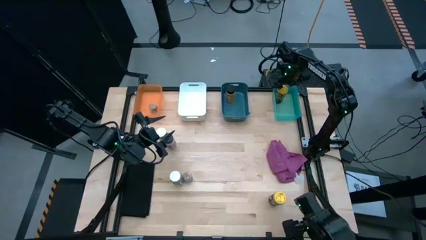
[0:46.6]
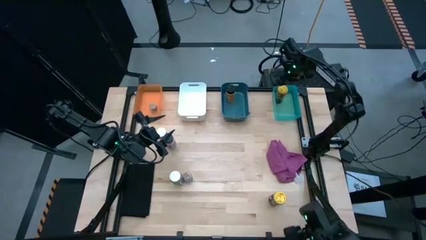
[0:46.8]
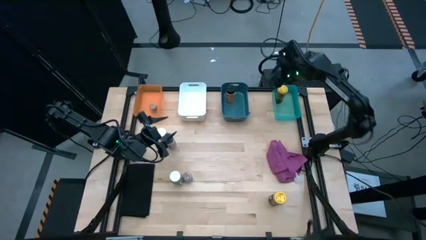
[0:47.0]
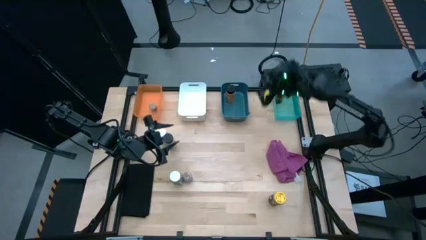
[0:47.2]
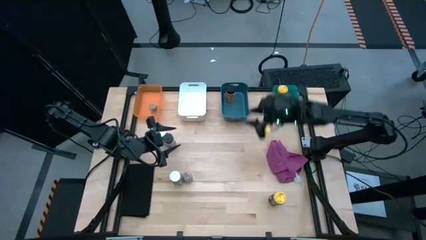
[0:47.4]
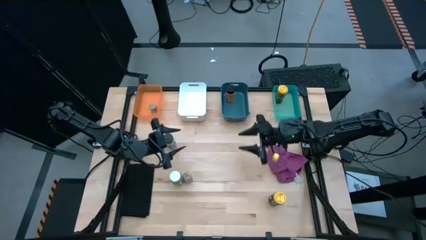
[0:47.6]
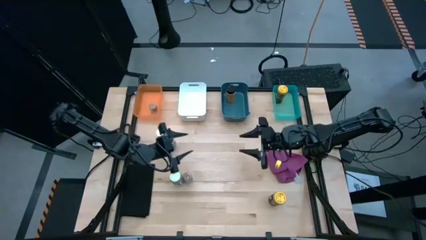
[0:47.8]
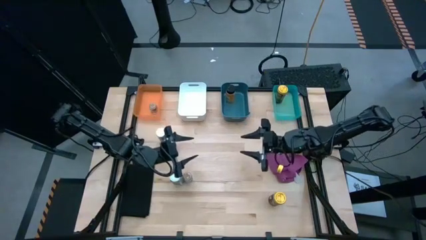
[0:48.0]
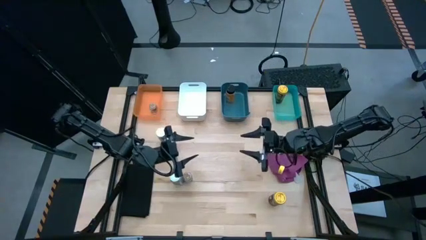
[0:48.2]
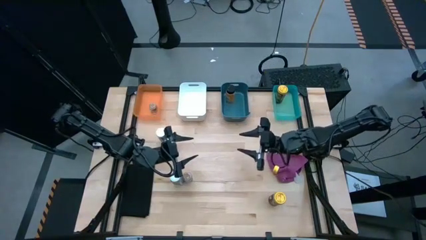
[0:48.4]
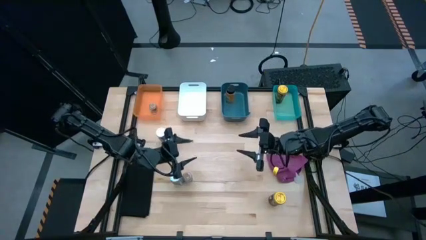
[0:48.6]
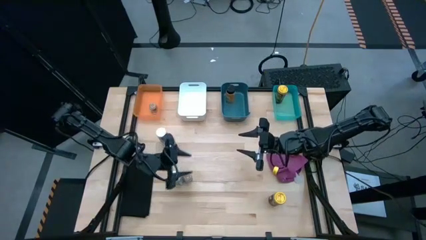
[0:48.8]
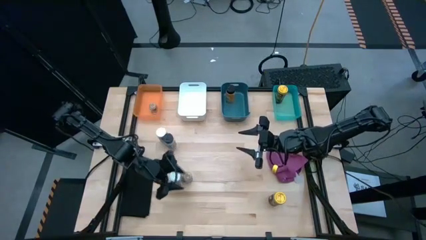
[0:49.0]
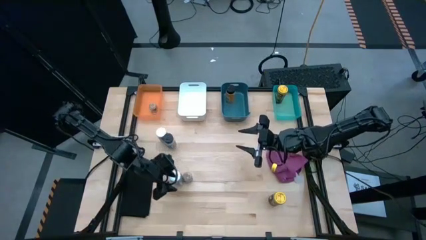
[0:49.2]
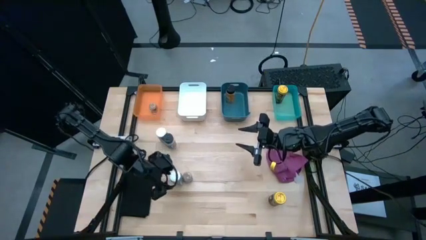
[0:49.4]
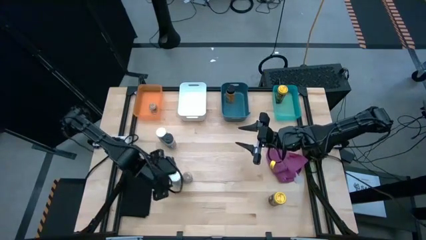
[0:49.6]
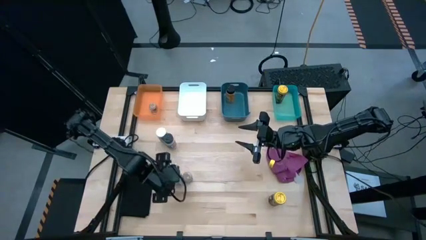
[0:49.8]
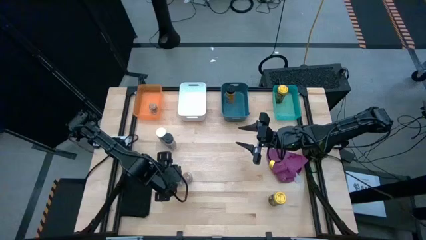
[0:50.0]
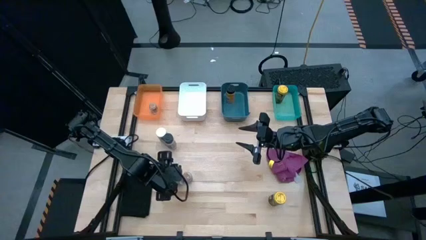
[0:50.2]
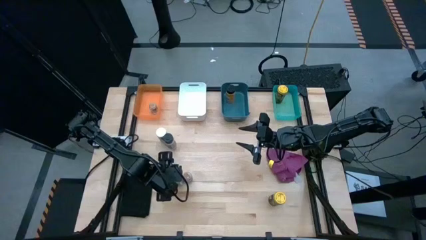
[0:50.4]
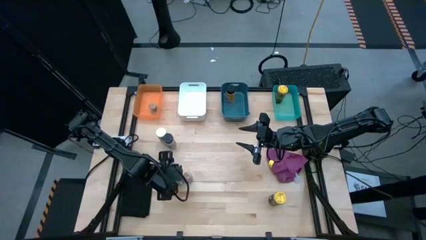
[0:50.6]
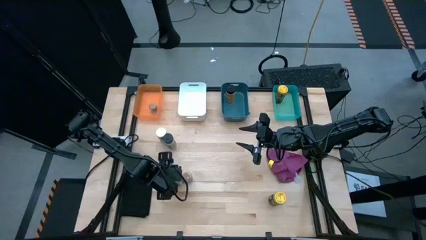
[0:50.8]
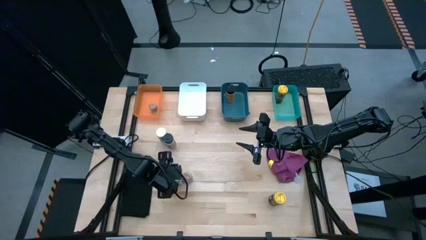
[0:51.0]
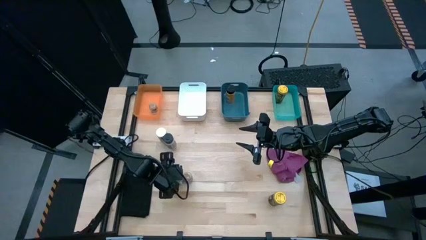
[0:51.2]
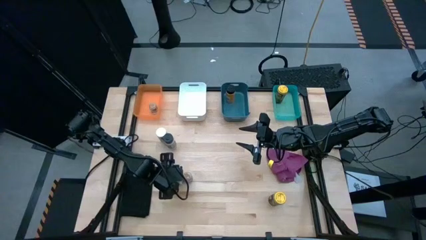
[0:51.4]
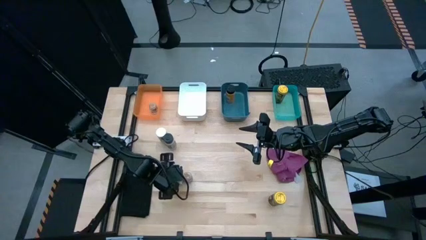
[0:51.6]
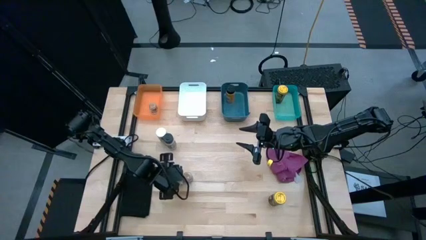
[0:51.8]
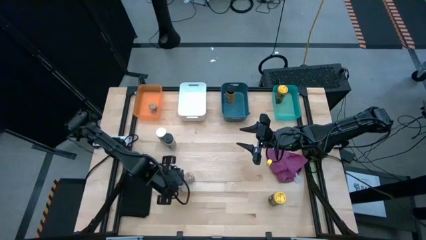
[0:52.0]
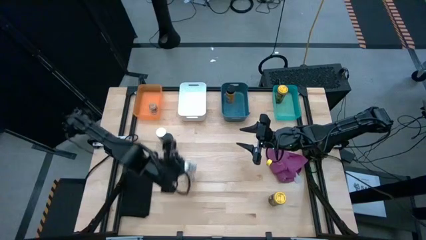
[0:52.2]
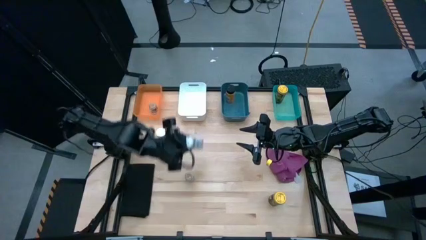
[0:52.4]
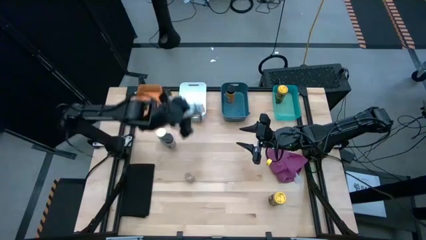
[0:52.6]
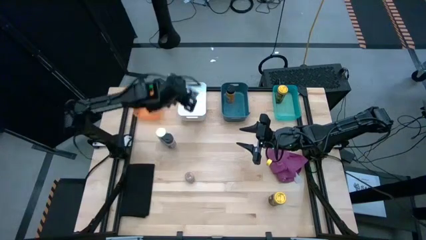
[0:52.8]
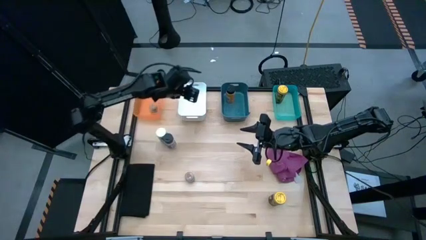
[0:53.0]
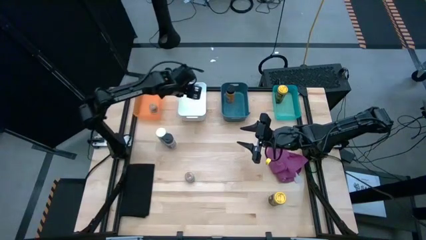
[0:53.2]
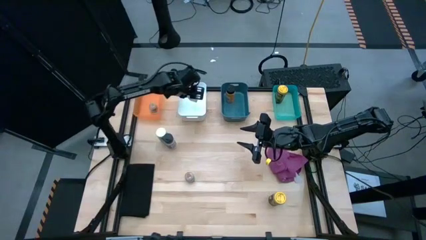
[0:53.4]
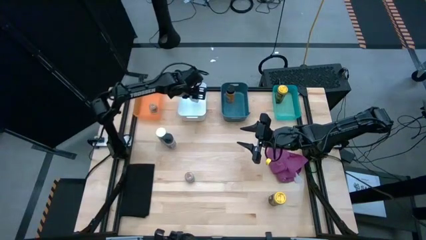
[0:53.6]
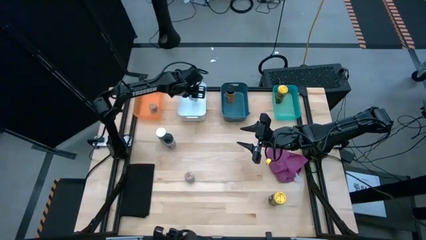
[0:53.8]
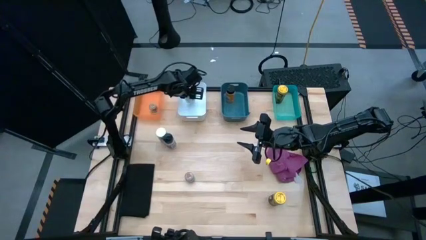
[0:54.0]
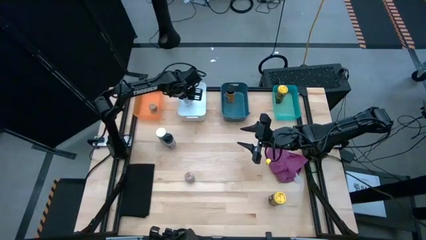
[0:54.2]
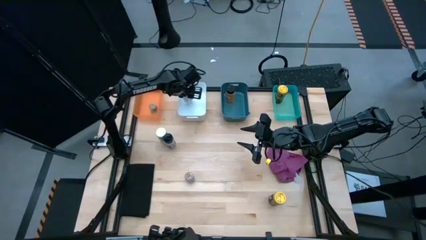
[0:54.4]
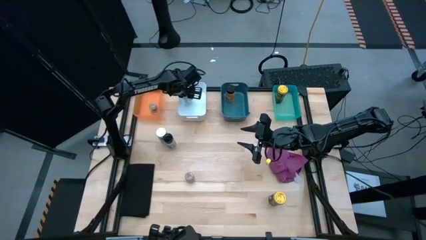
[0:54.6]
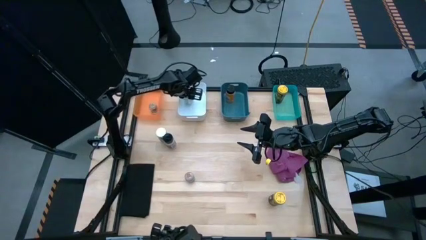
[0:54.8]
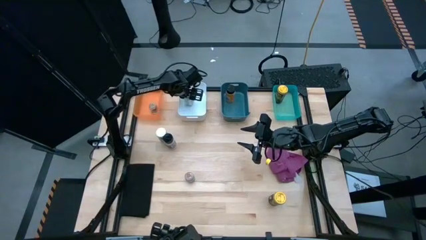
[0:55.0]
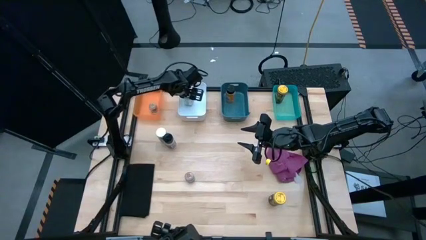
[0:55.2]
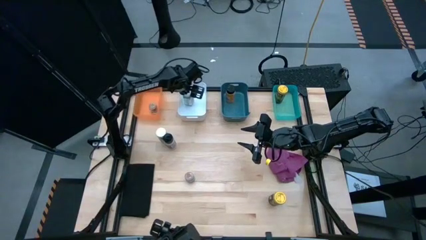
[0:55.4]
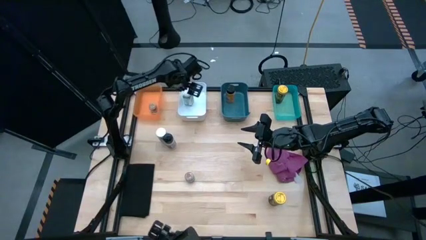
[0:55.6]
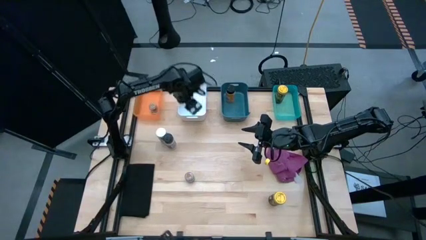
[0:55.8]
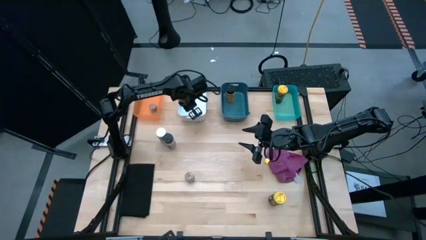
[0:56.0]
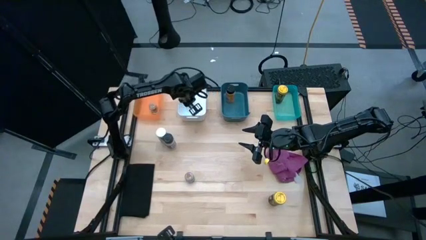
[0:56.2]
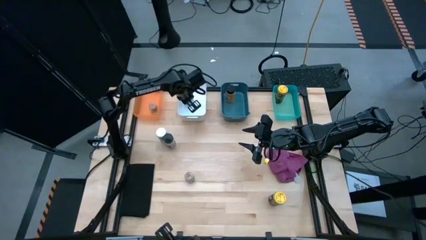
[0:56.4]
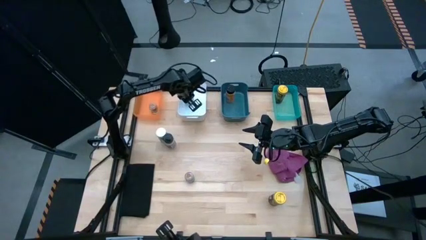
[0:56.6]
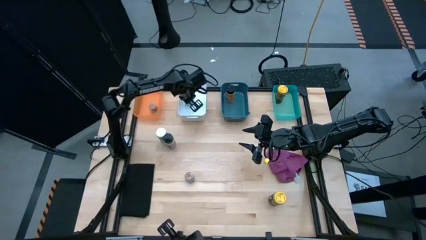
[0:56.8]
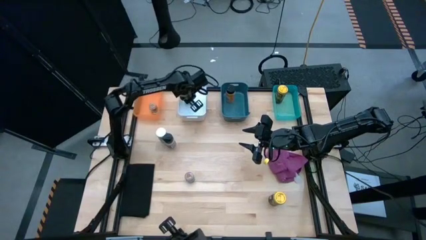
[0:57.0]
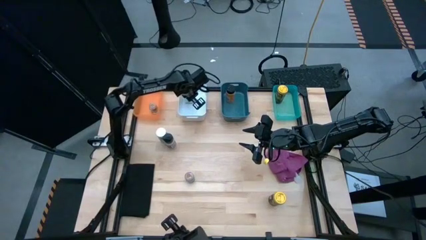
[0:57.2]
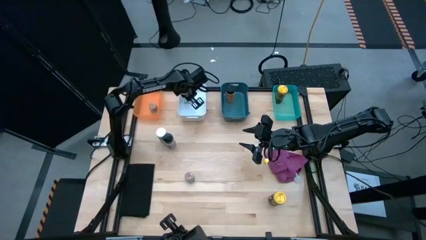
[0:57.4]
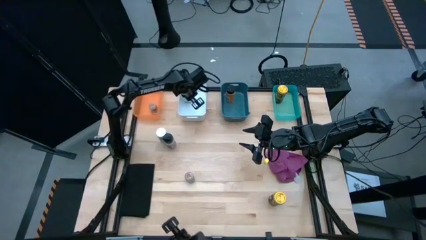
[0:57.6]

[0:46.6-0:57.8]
Task: Sort spices by type
Put the white seasoning bottle into the white bin

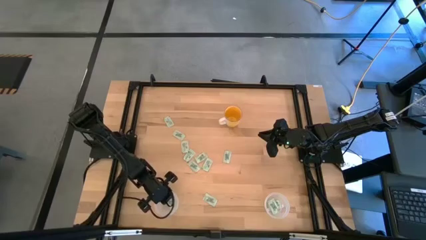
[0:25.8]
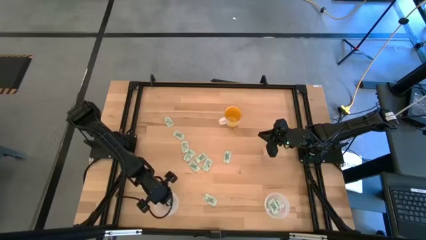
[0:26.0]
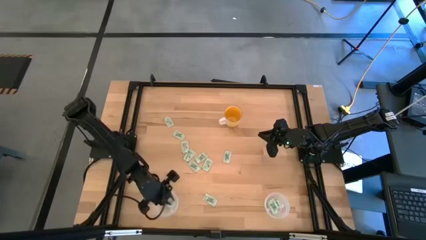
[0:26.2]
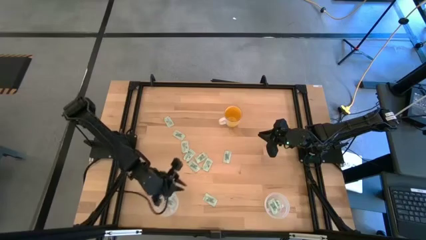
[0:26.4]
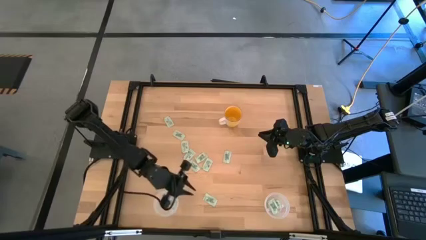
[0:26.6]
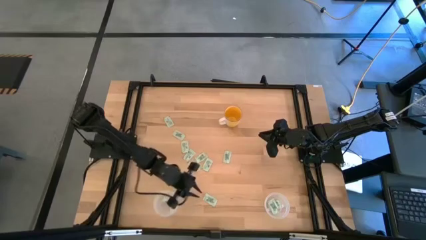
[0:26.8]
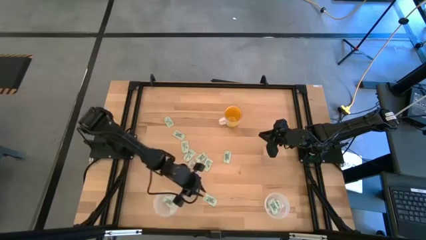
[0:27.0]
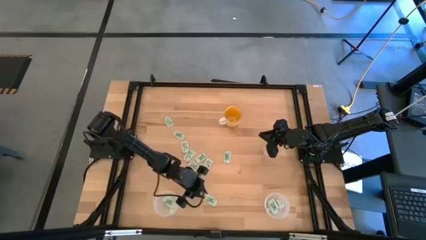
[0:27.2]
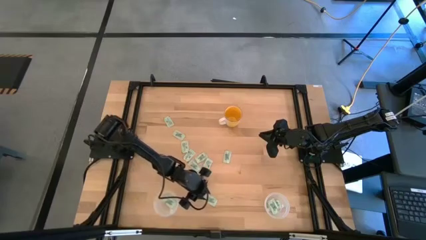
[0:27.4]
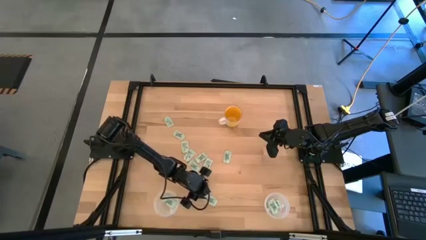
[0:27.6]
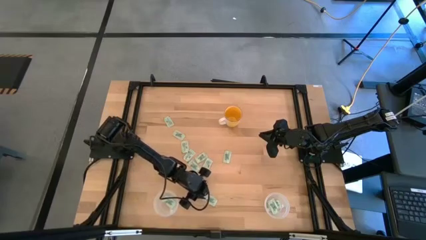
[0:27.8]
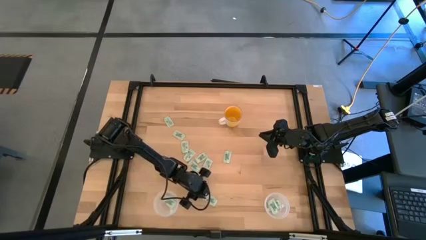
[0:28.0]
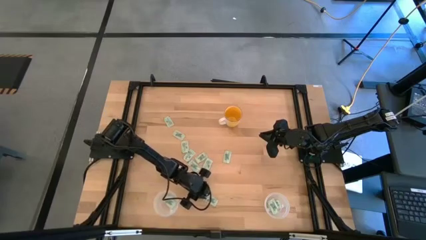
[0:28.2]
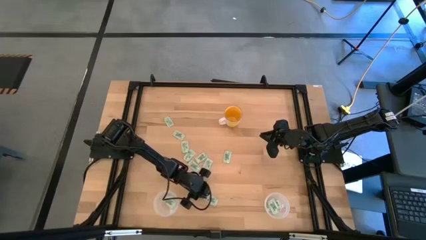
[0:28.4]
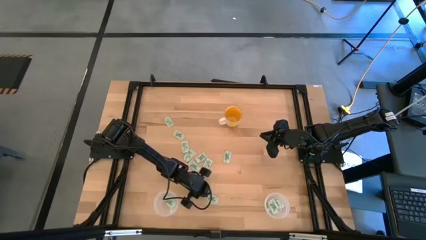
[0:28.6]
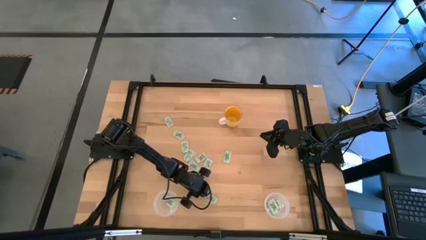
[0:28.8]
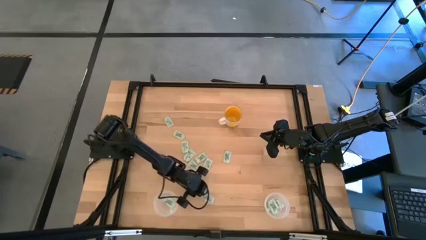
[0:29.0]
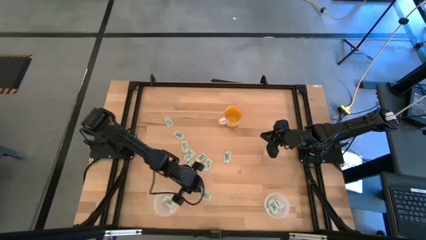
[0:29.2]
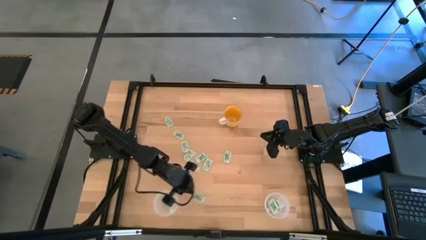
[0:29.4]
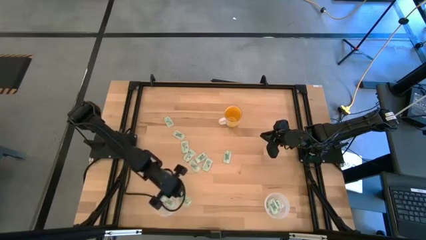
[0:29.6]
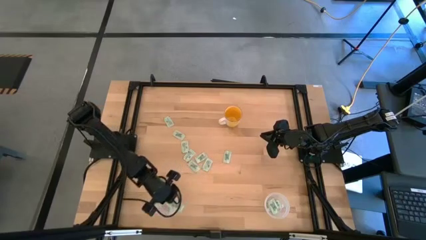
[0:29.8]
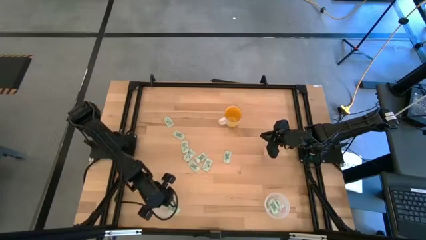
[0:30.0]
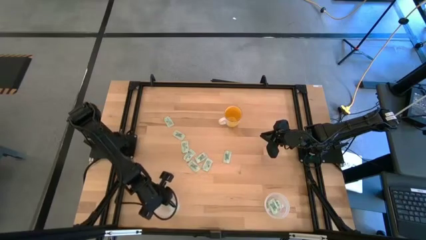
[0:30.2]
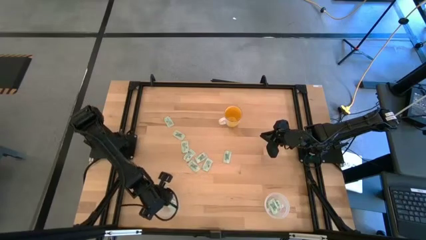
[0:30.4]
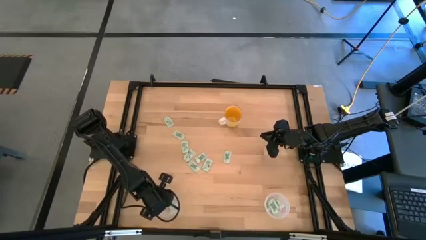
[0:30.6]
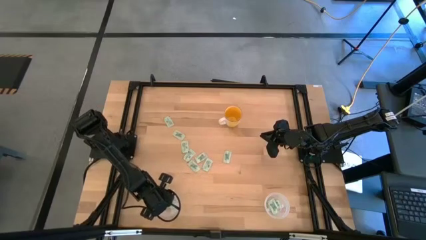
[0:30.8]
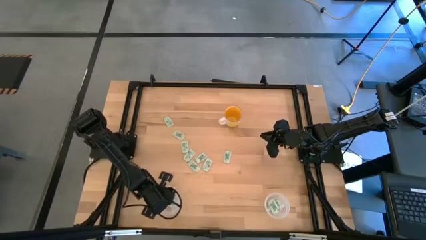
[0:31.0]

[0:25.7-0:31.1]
Task: Pick and place items into bin
Put the stevia packet into the left transparent bin
